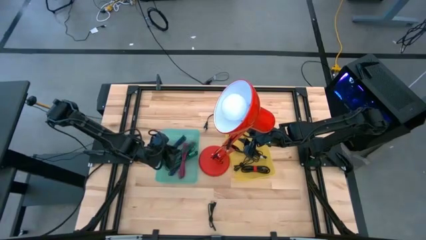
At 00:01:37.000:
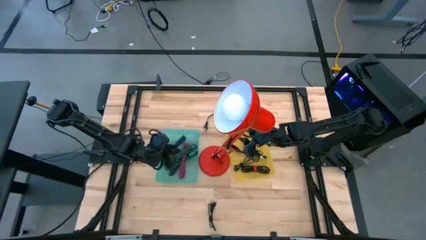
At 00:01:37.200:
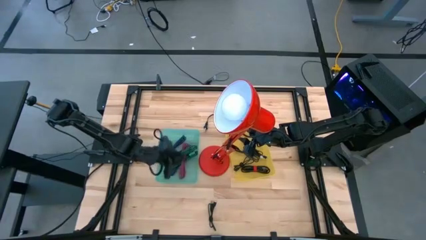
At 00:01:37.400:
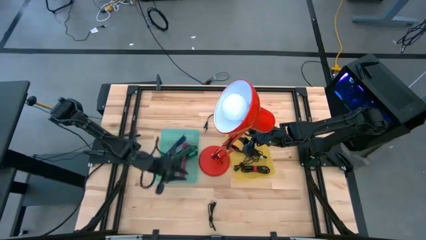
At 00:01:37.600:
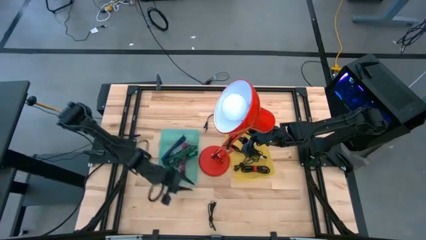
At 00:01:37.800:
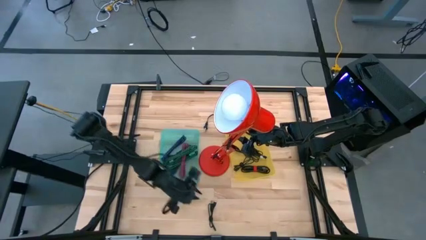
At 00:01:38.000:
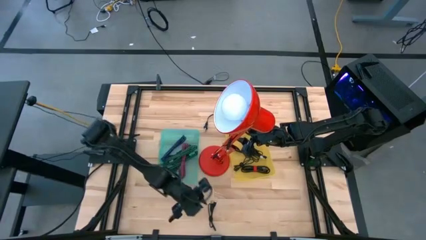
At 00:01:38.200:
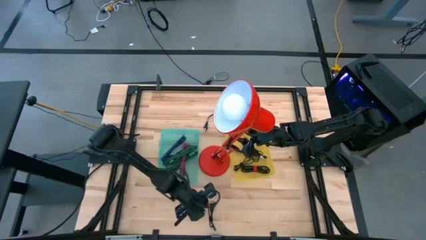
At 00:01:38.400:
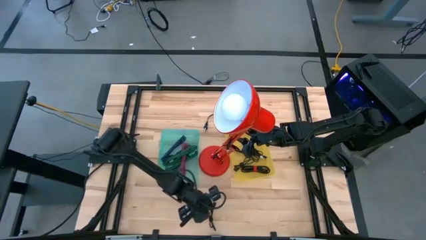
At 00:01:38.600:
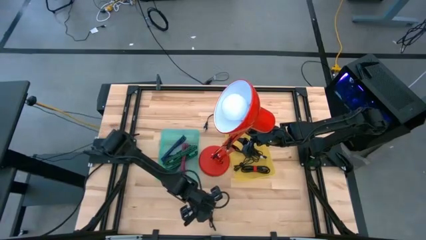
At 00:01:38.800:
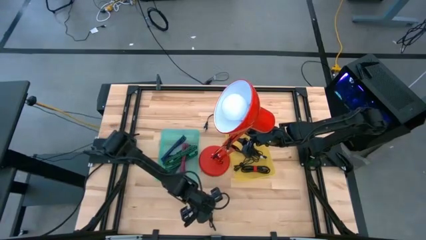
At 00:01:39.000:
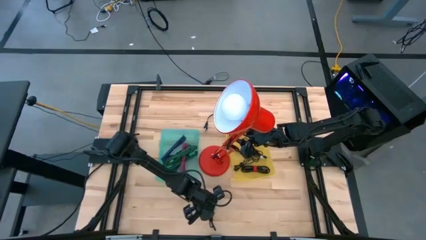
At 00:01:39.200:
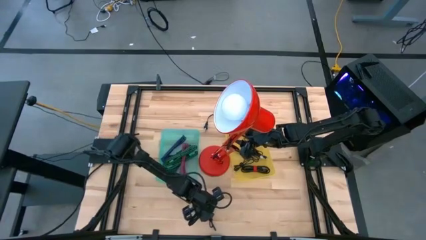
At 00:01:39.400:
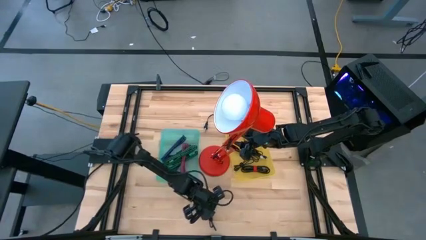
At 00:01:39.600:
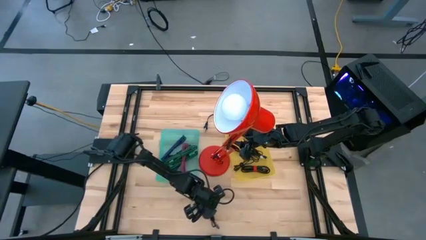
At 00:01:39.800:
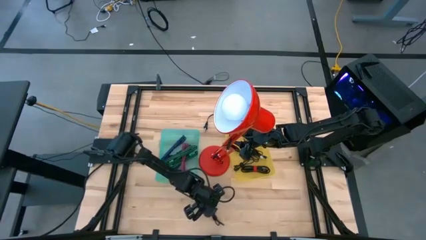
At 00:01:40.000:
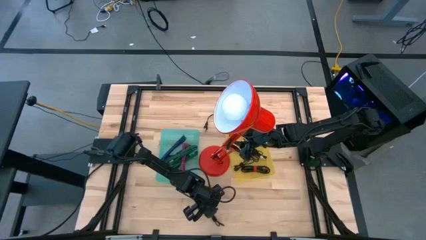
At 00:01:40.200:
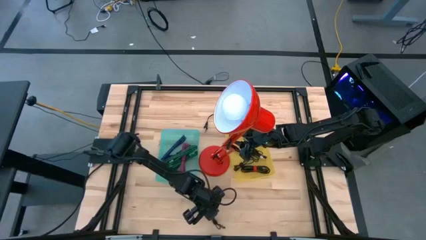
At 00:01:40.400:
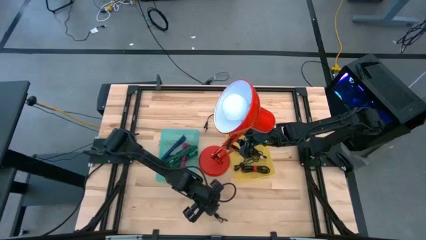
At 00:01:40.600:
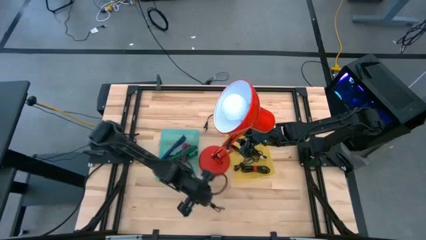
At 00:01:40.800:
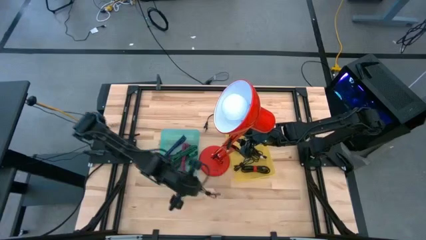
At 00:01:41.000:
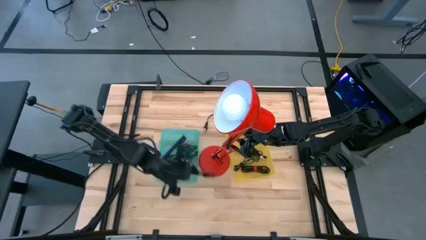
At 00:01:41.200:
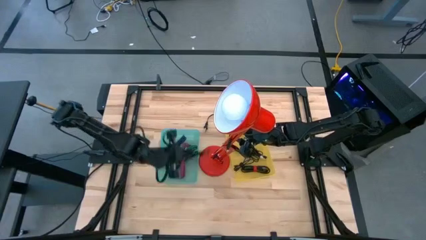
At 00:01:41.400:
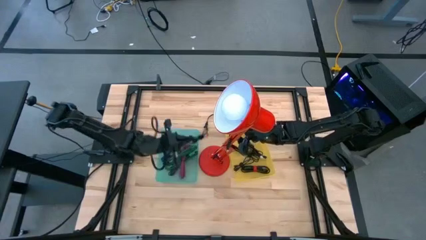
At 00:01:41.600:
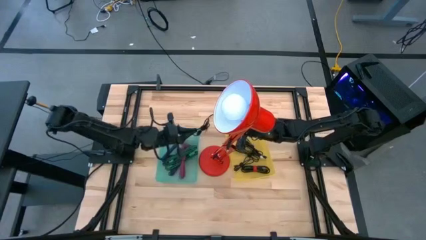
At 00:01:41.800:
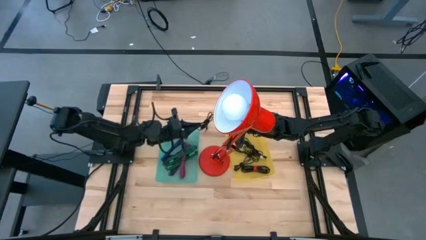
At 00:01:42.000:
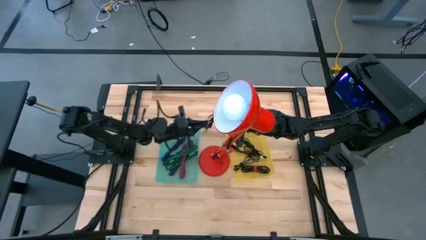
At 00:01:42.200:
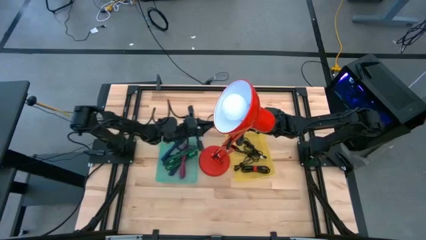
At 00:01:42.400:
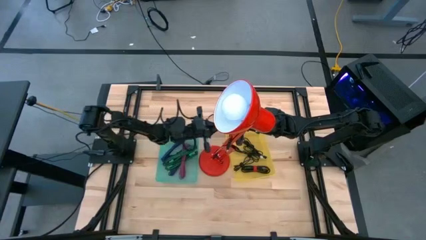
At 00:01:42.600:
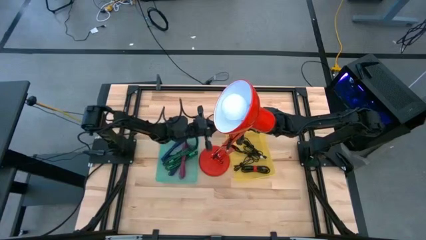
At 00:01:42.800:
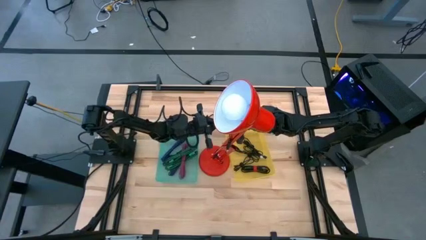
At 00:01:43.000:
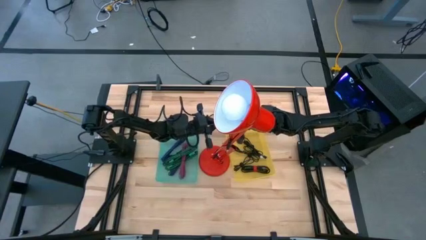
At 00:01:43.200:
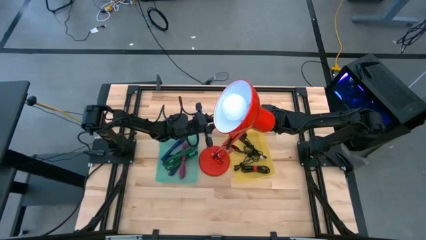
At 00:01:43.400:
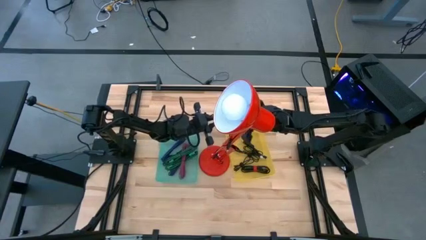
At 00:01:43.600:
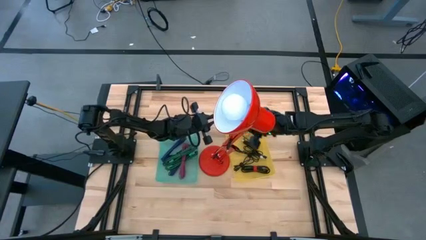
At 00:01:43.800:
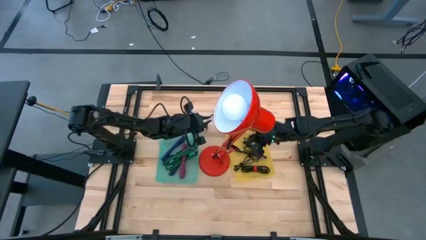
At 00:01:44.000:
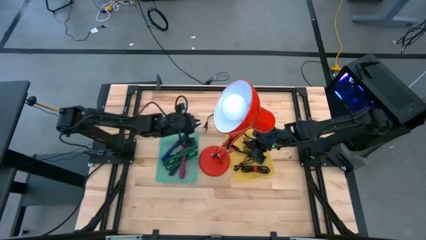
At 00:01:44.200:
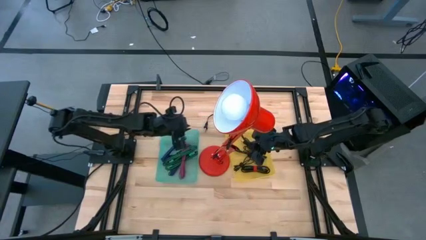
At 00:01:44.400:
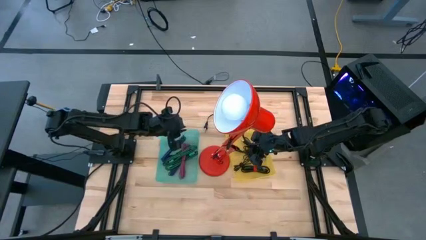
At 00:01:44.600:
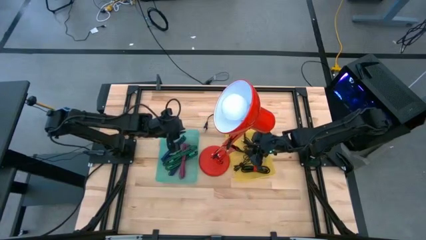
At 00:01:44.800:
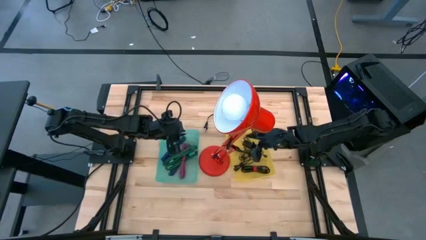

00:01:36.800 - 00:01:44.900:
Task: Pick & Place USB Port
Put the black charger cable into the yellow bin

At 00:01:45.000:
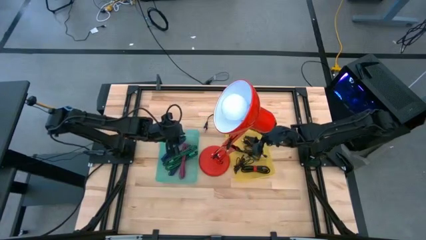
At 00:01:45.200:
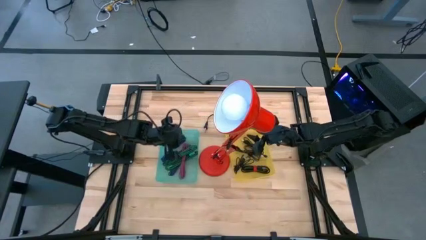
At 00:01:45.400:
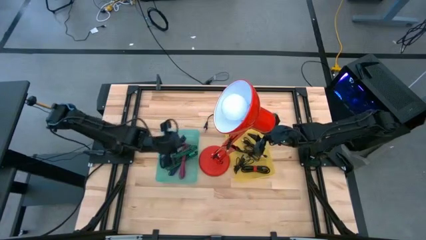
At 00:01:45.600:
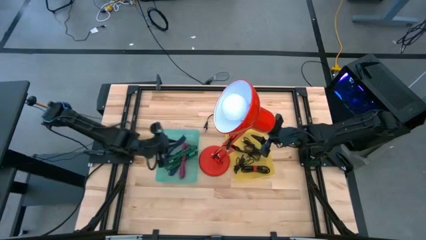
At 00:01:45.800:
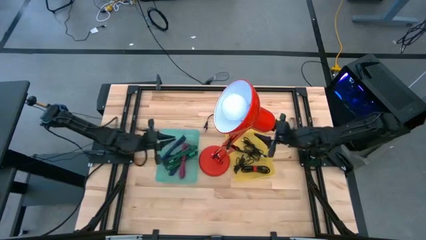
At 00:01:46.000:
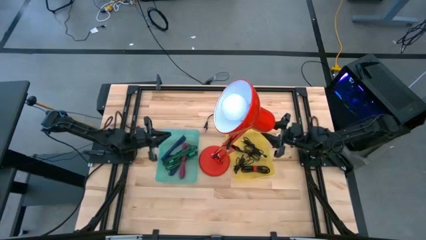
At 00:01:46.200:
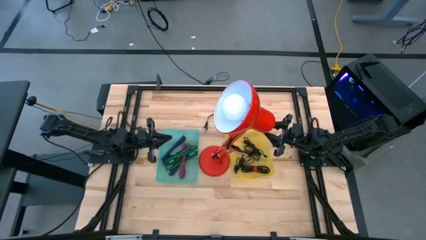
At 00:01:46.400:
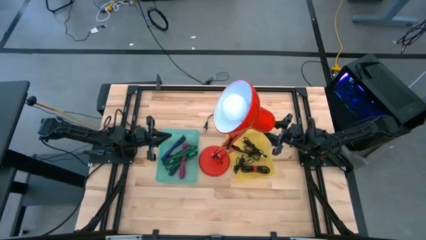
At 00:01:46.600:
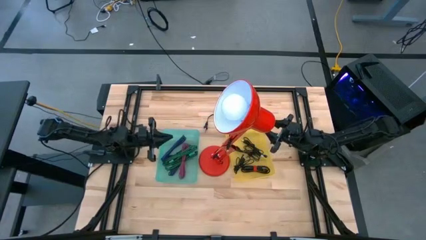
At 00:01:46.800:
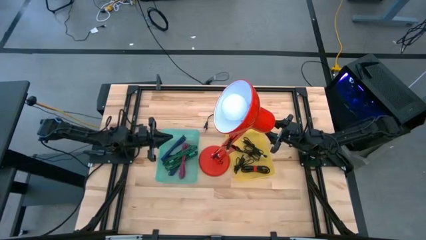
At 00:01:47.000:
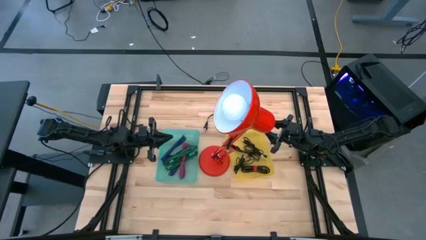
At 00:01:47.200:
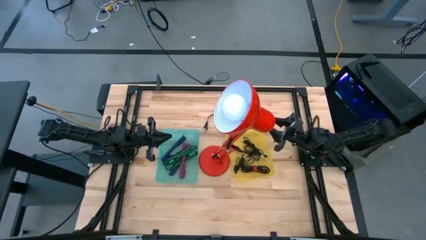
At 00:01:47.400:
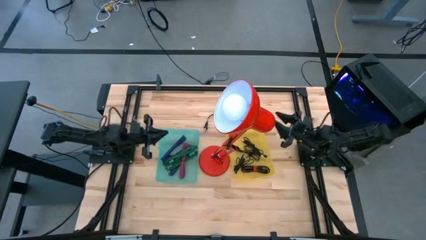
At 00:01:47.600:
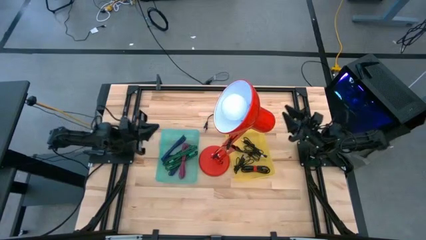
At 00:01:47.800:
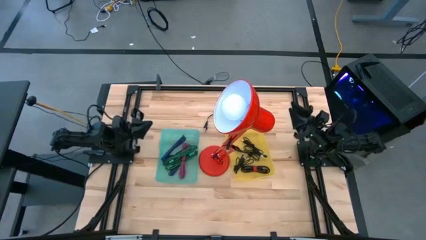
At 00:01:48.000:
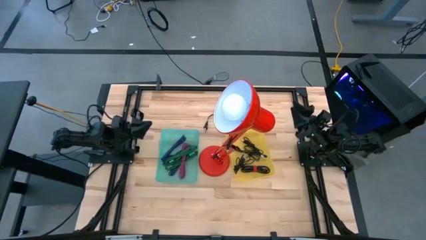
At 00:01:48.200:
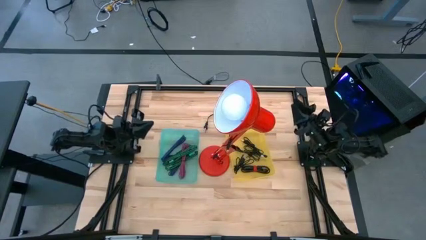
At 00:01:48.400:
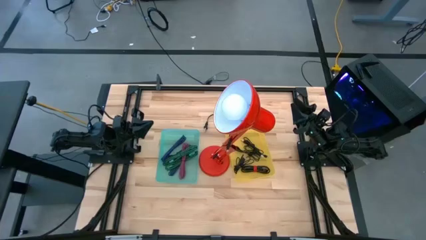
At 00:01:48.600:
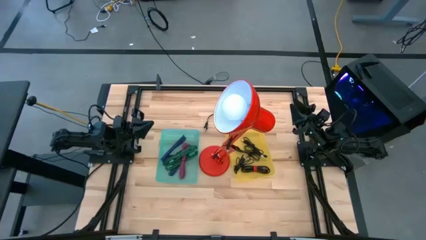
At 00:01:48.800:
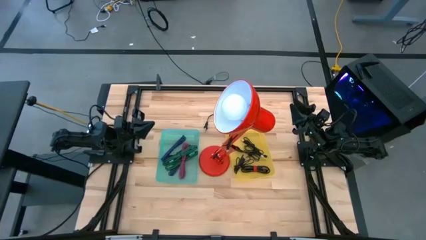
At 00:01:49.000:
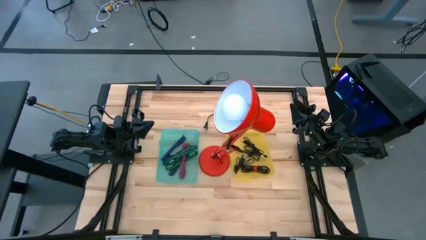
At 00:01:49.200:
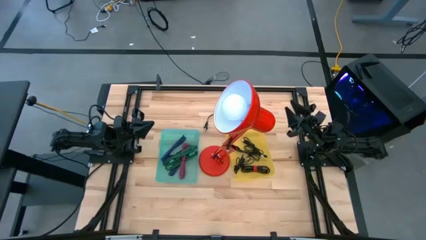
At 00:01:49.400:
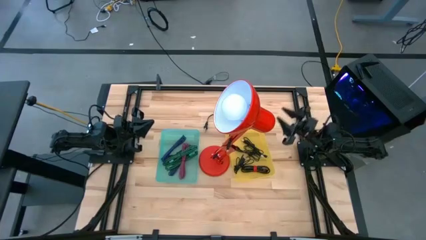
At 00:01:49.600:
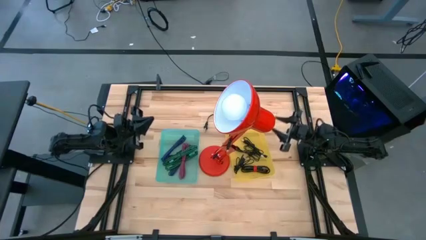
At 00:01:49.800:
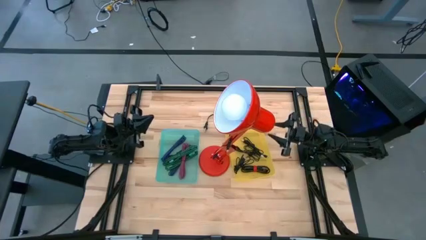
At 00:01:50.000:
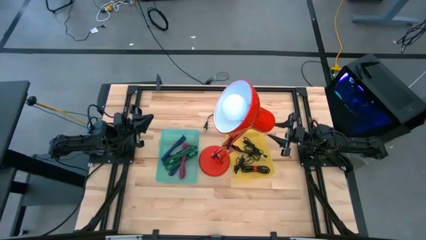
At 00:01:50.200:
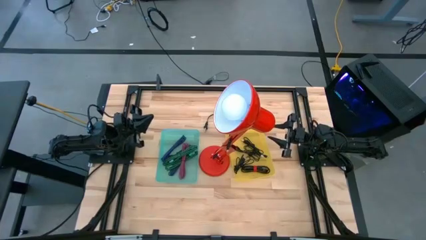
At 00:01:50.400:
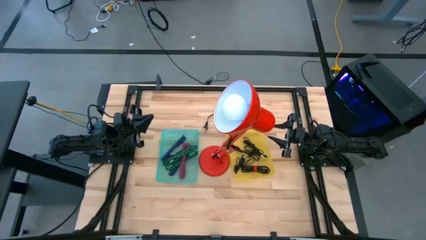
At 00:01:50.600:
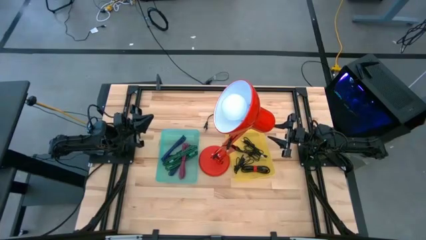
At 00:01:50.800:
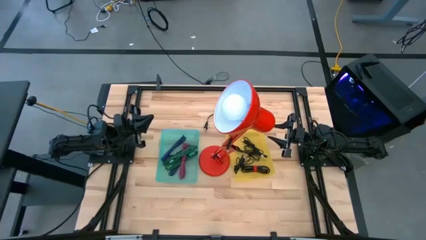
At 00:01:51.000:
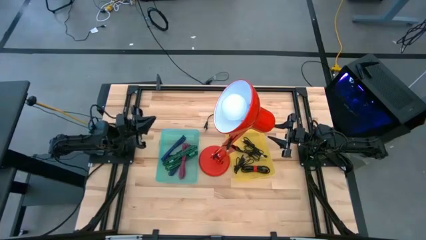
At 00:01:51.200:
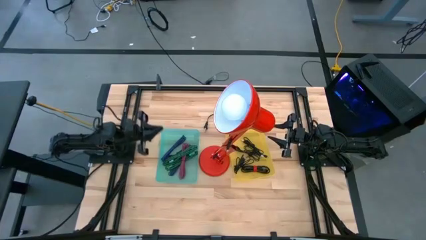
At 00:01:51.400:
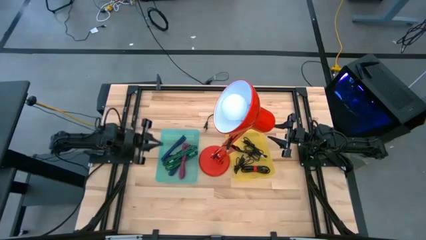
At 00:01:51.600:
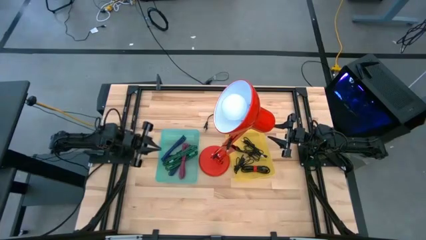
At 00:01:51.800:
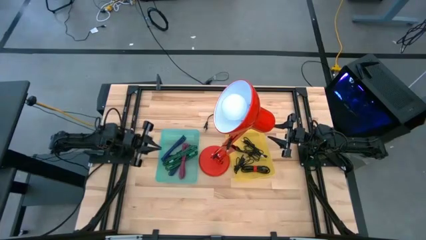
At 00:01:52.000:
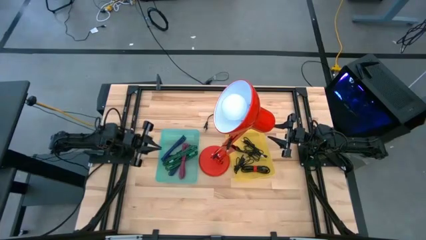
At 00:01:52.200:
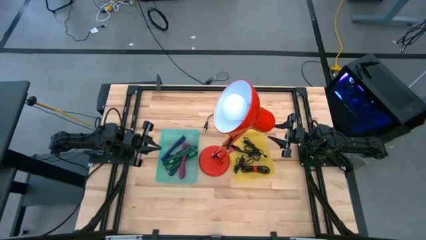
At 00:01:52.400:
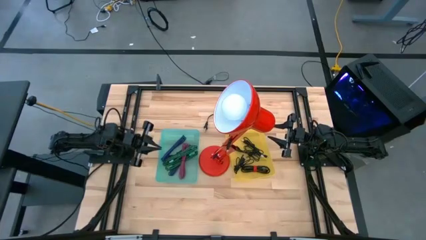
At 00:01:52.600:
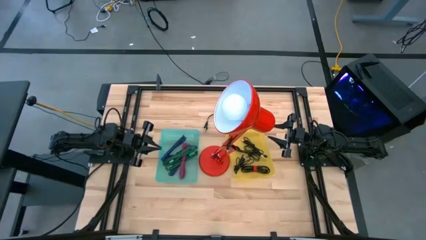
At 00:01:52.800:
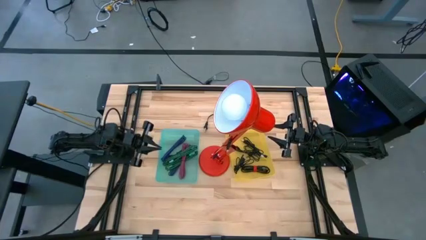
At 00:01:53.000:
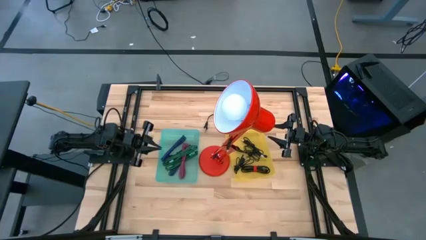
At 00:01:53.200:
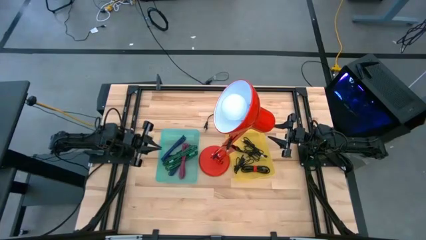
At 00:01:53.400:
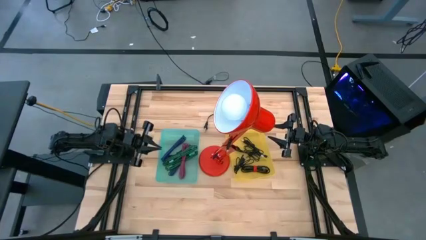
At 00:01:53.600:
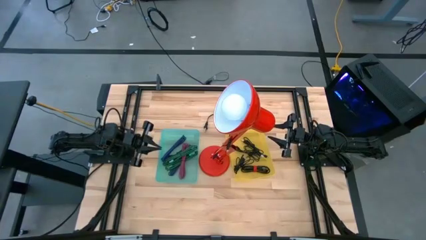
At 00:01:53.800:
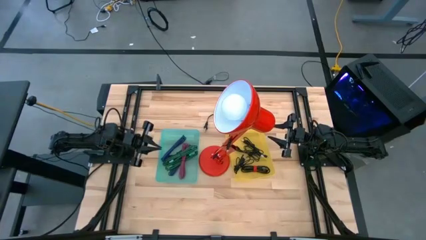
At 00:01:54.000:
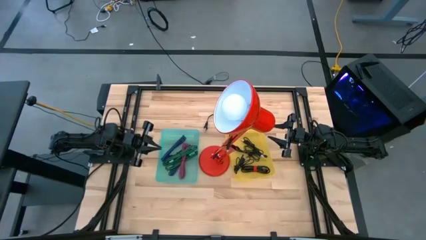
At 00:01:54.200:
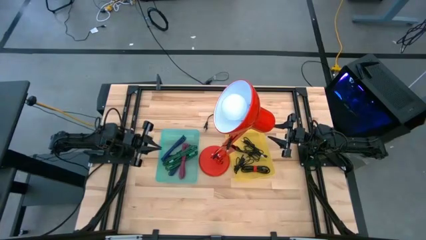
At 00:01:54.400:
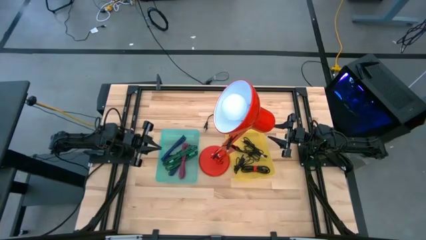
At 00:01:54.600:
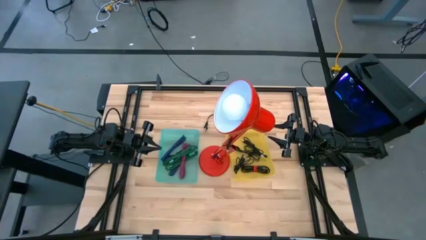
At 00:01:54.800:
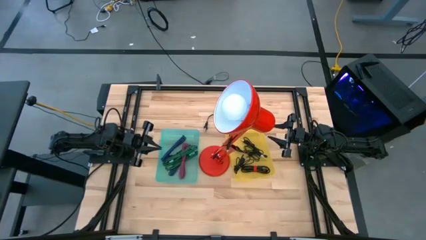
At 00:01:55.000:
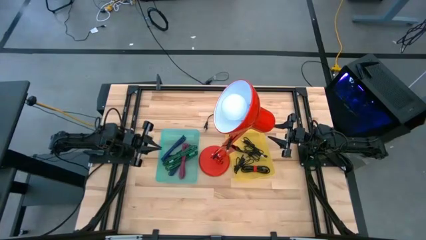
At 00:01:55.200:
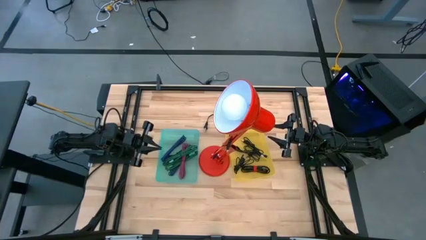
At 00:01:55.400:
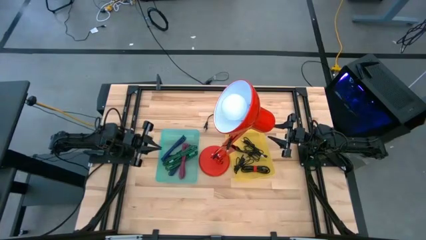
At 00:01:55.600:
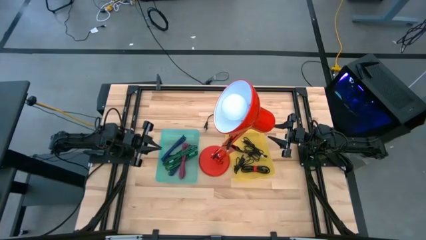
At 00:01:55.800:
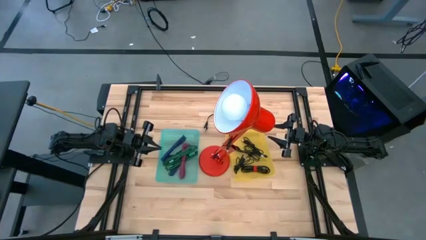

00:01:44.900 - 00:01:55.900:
Return to Home Position
